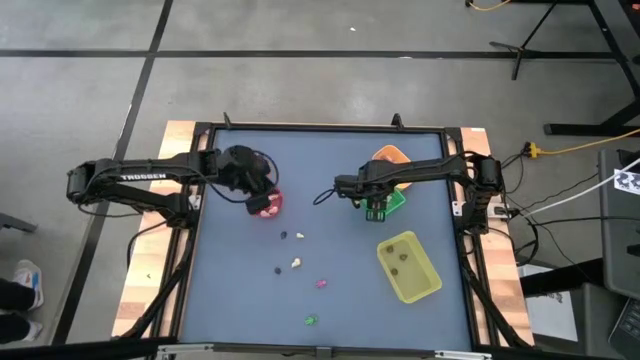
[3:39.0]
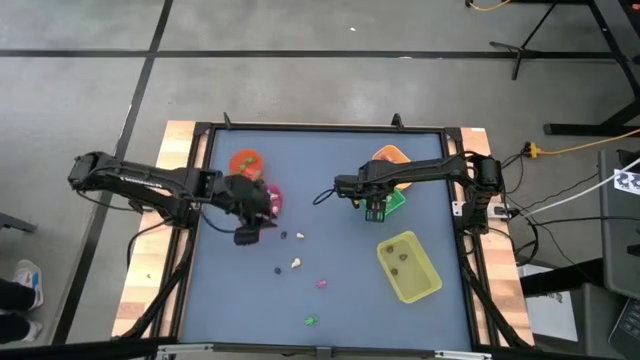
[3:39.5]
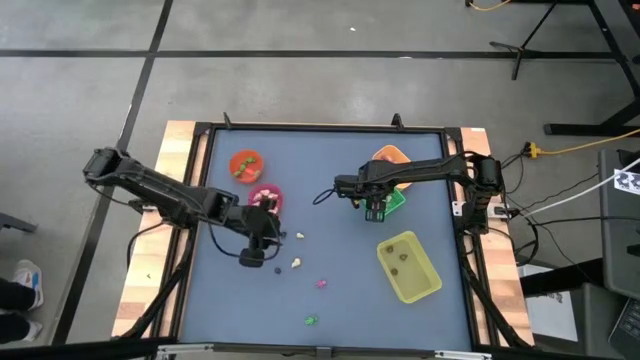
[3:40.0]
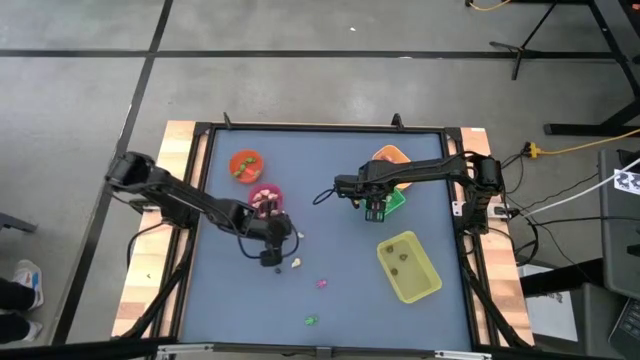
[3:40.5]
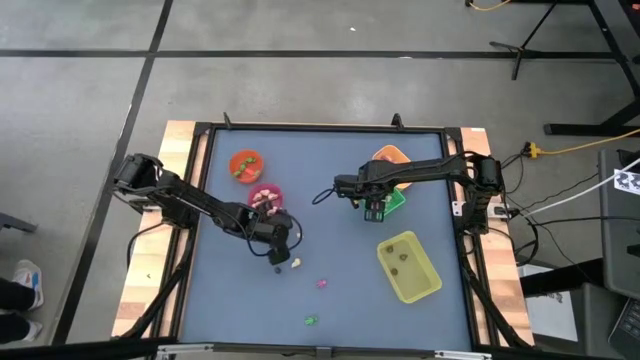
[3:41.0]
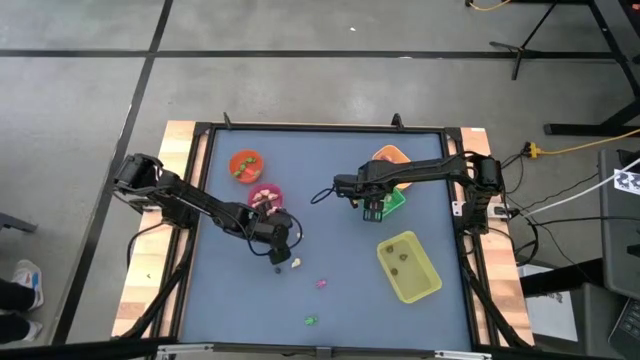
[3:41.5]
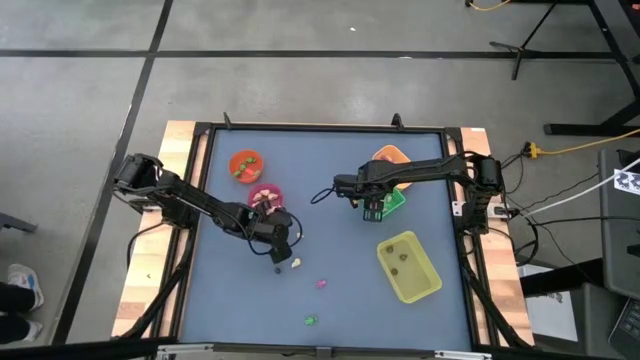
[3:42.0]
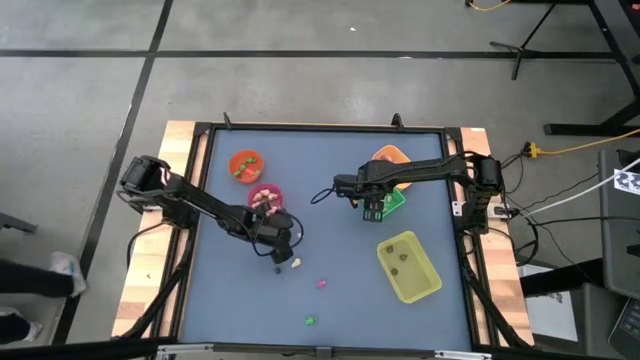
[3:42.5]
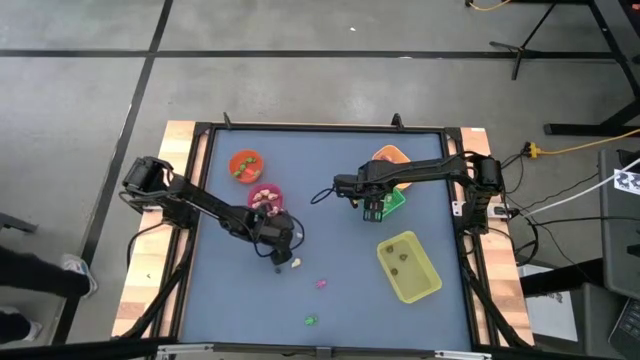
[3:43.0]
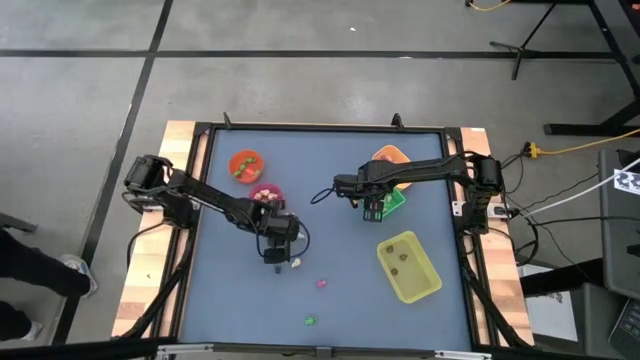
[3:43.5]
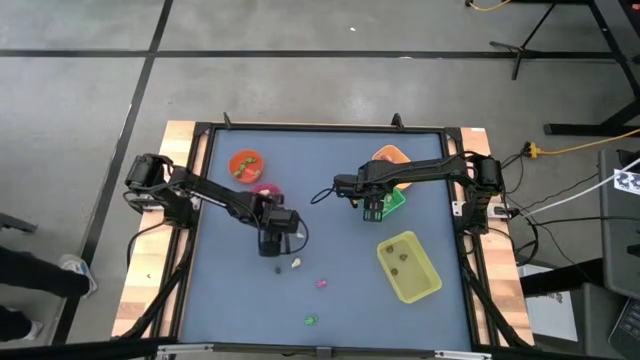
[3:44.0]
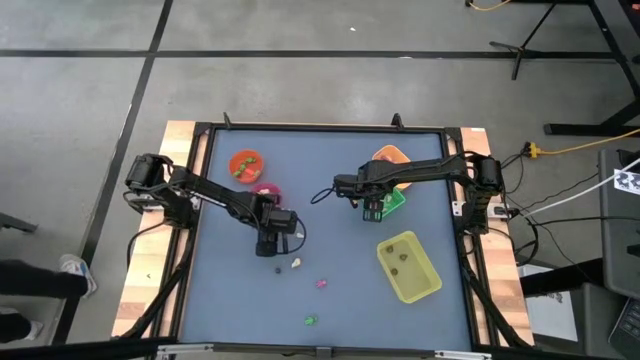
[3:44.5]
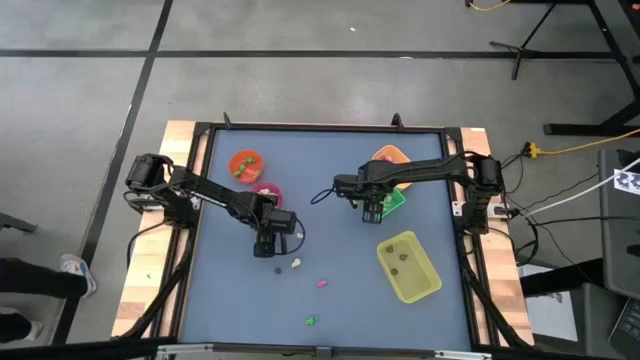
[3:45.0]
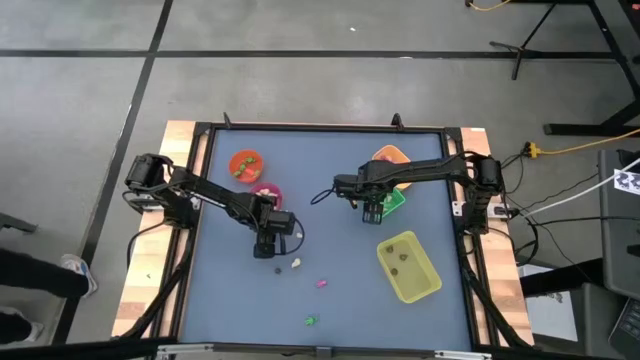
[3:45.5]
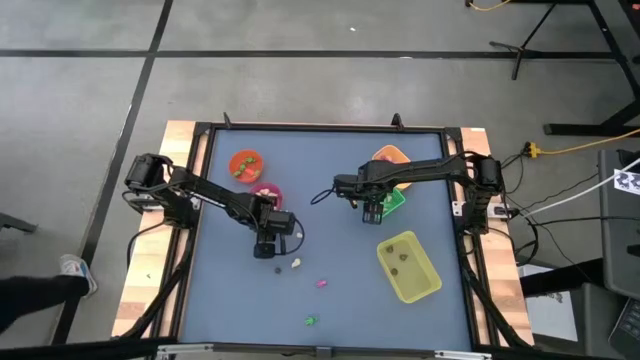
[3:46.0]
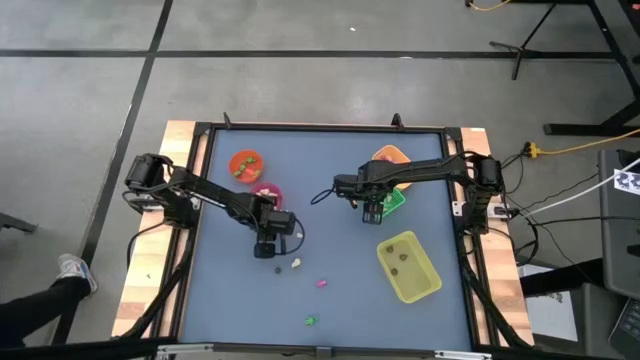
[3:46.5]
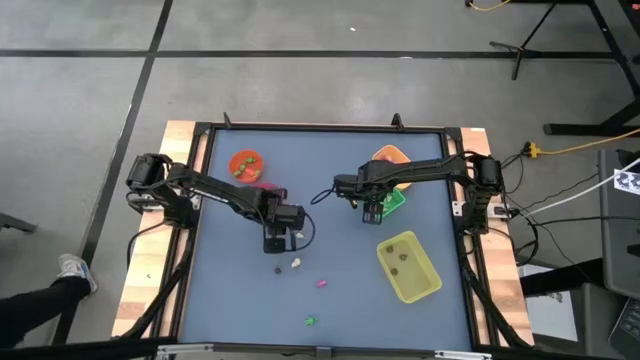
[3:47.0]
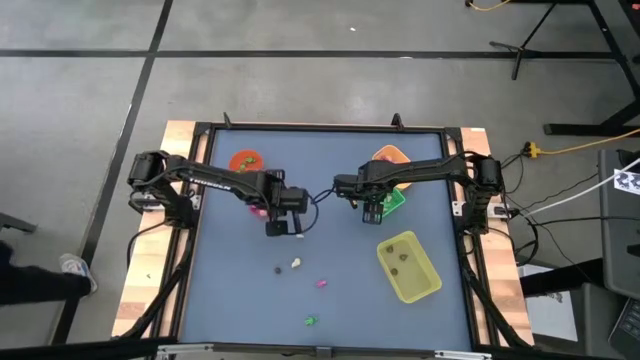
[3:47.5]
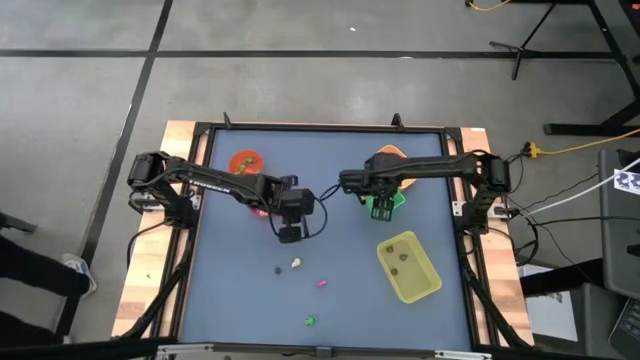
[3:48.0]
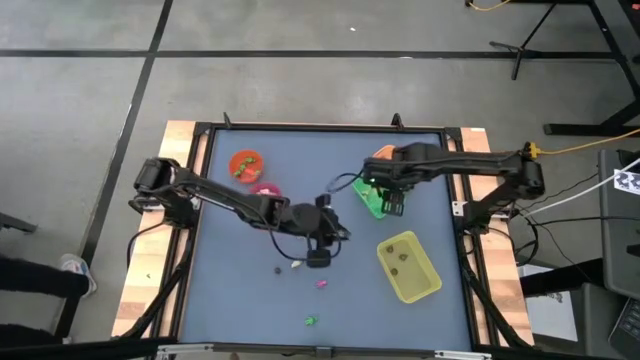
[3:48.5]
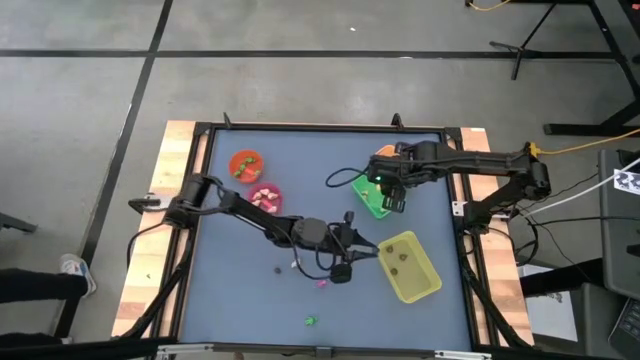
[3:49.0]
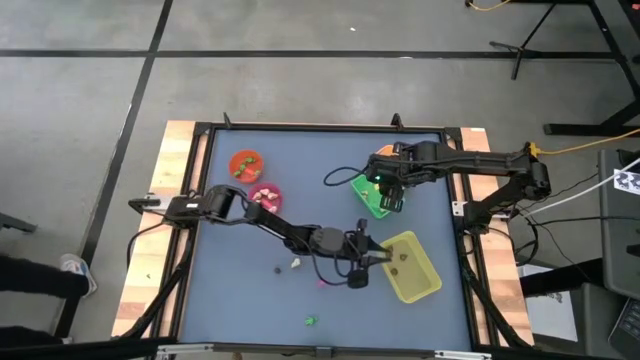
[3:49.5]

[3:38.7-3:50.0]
Task: Sort Halloween decoration
Put the black skull toy into the light yellow bin

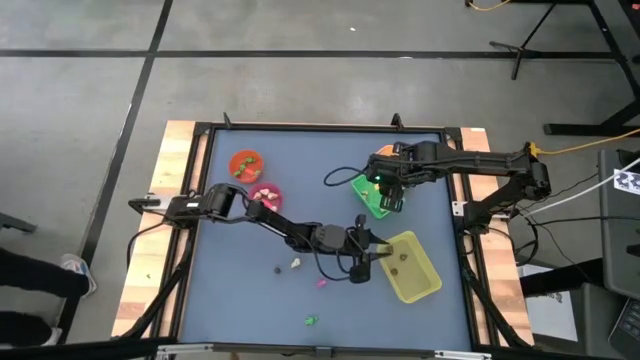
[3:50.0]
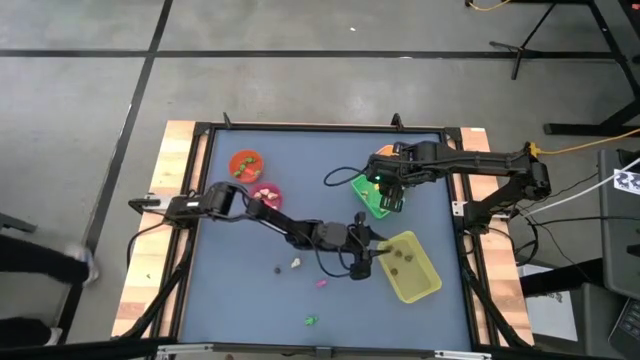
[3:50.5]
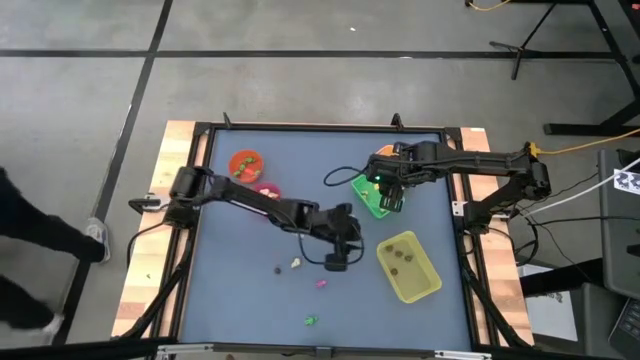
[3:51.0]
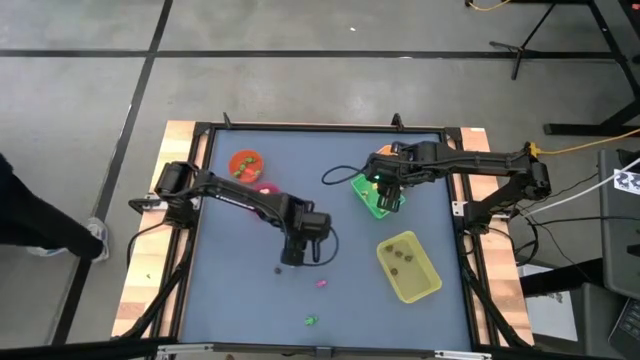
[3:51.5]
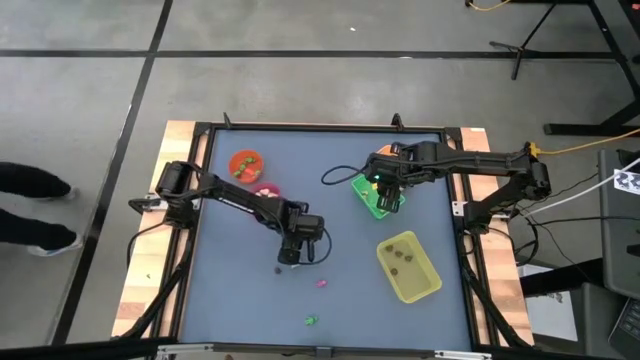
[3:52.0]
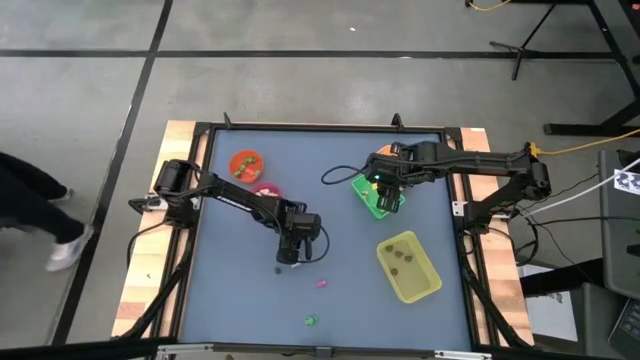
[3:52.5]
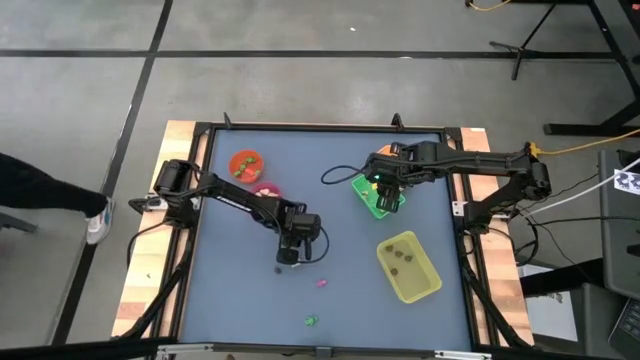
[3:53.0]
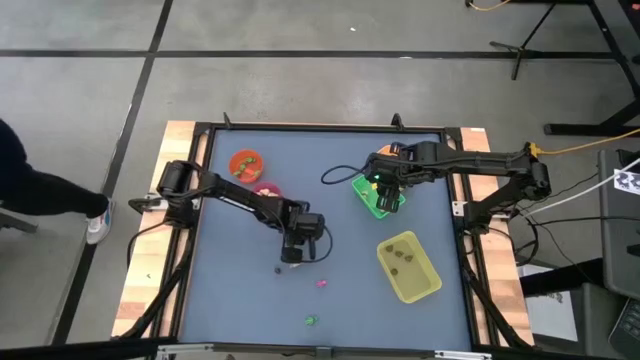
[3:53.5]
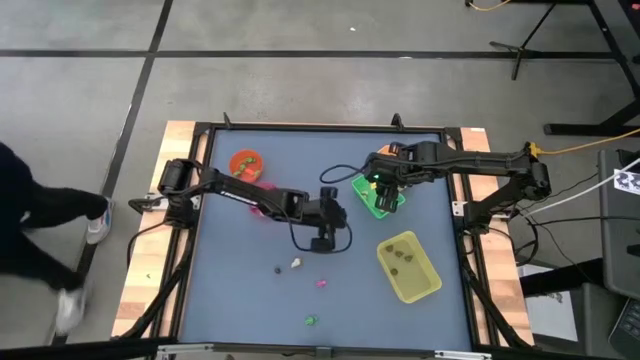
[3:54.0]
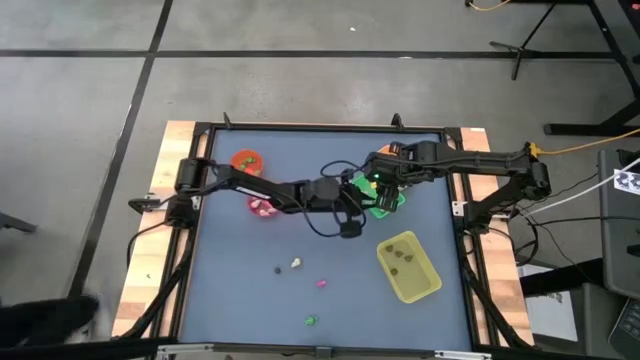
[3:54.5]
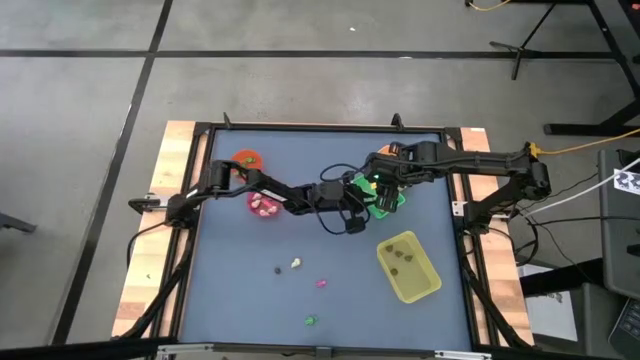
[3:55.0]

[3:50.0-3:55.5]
Put the white skull toy into the green bin

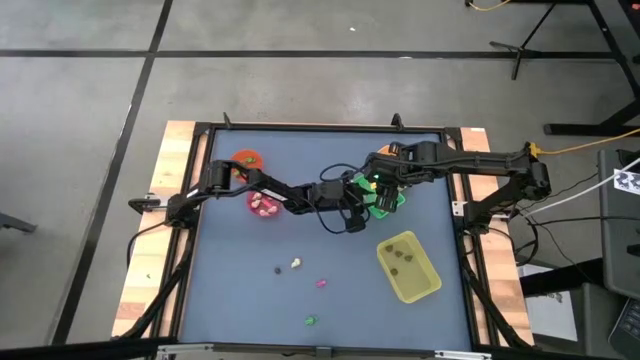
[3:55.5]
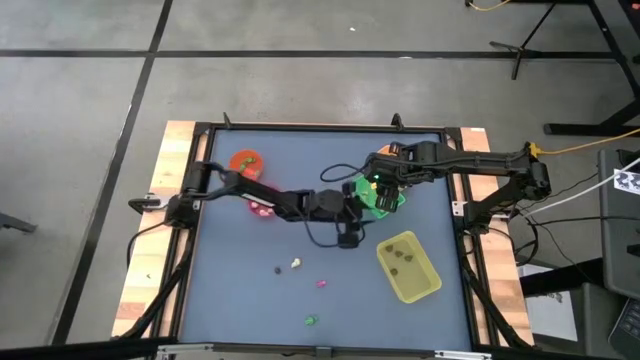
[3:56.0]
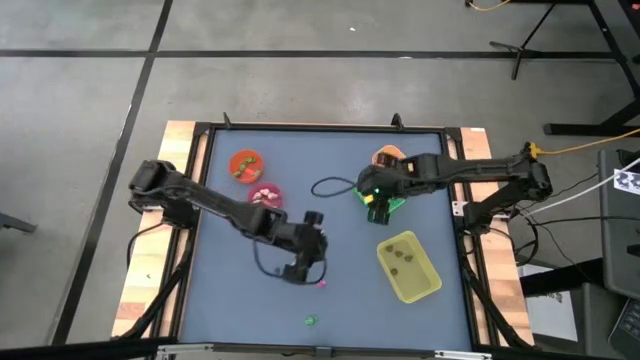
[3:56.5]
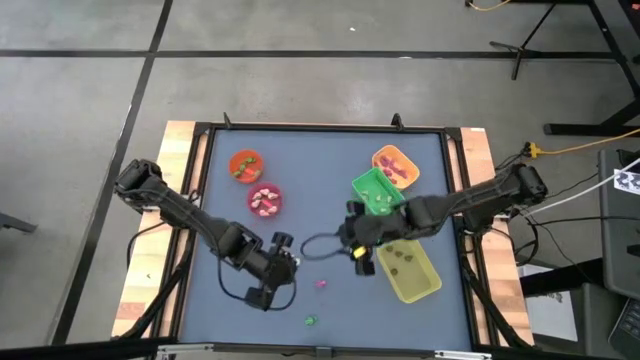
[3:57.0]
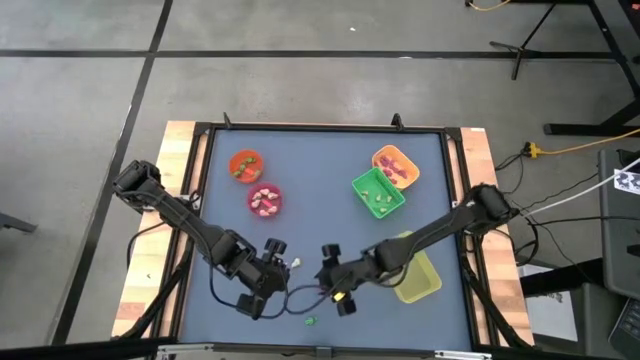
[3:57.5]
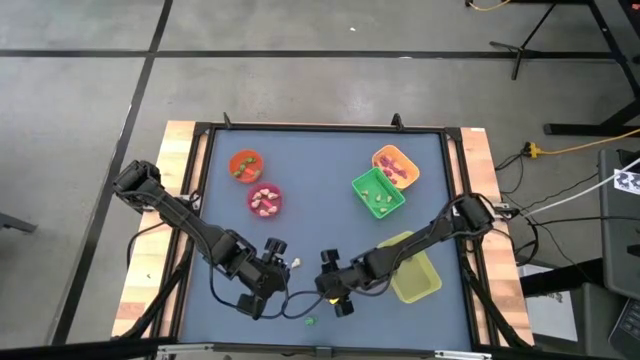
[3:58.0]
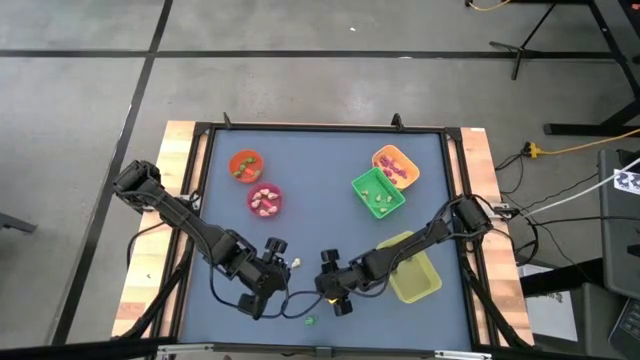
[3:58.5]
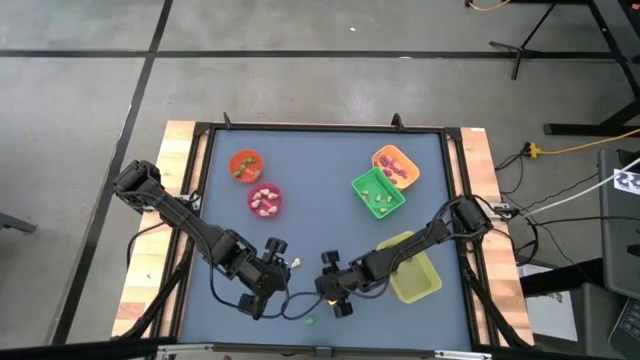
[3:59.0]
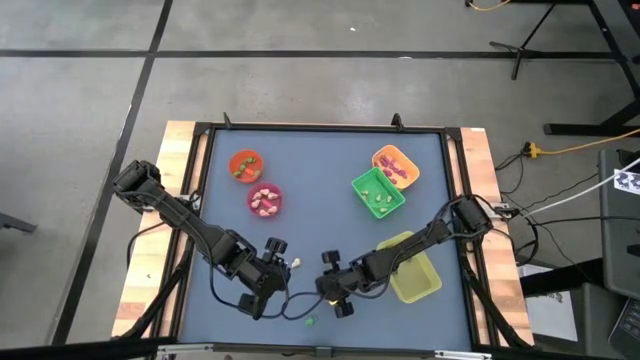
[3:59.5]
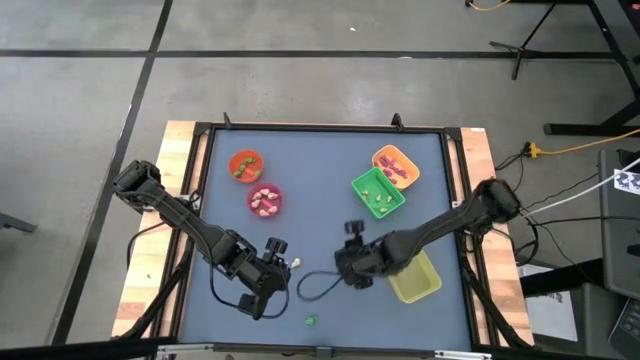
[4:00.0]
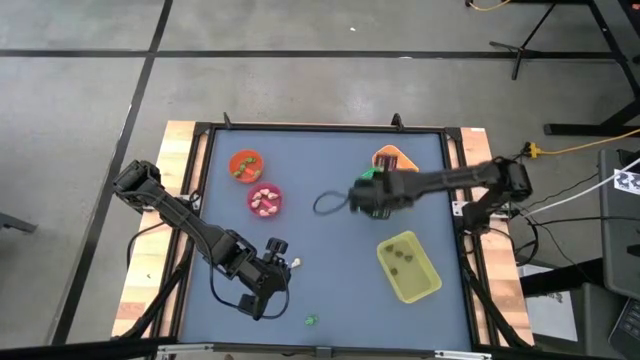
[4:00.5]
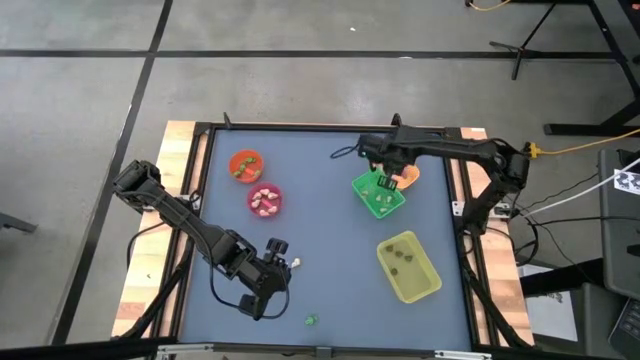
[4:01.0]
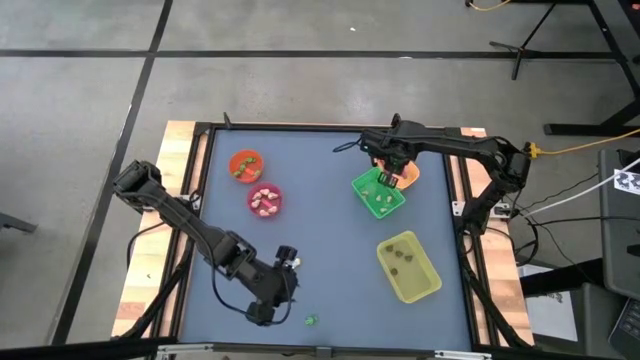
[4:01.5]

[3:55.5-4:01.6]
Put the pink skeleton toy into the yellow bin
